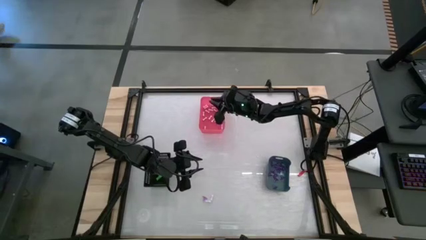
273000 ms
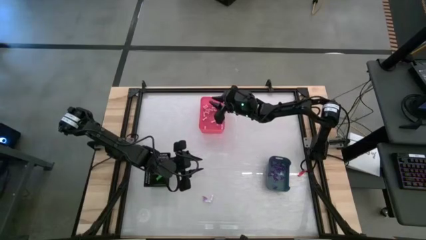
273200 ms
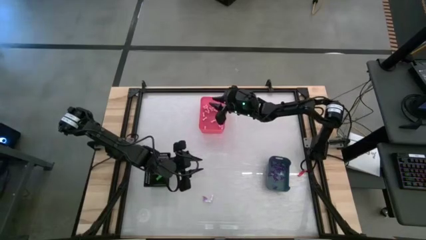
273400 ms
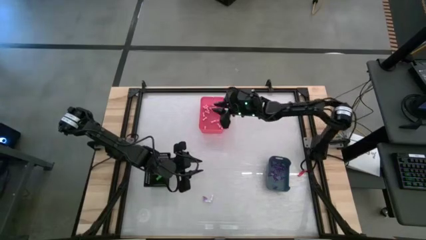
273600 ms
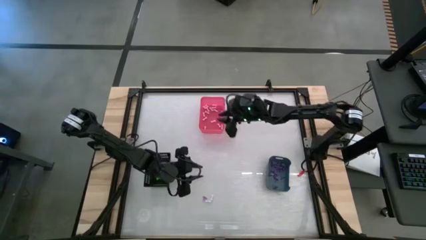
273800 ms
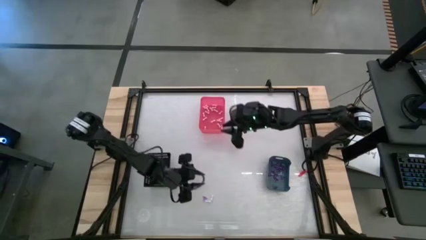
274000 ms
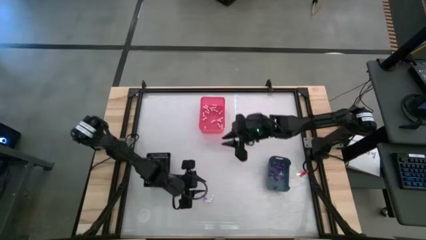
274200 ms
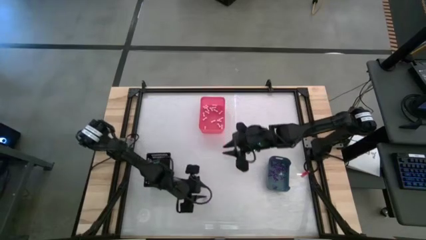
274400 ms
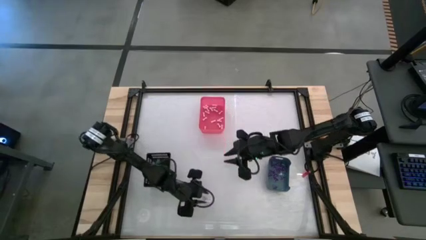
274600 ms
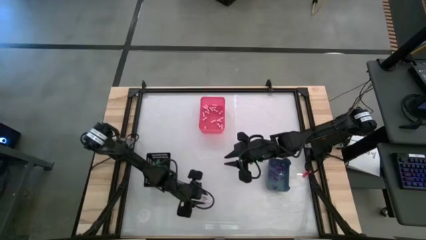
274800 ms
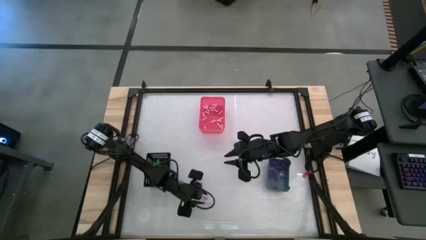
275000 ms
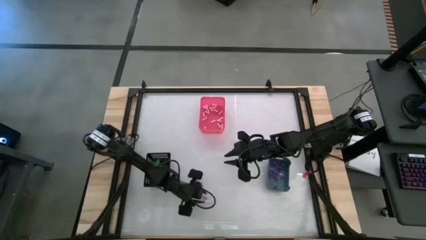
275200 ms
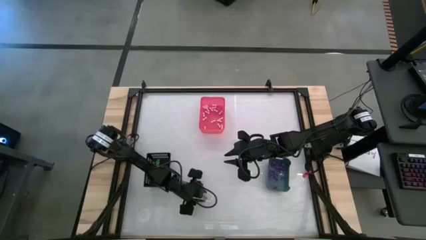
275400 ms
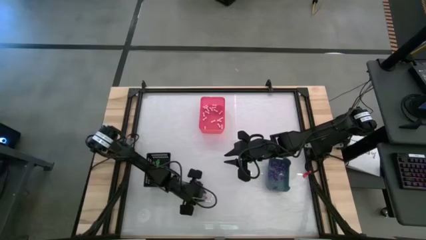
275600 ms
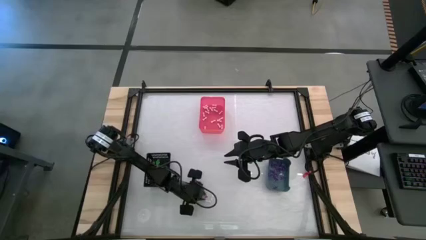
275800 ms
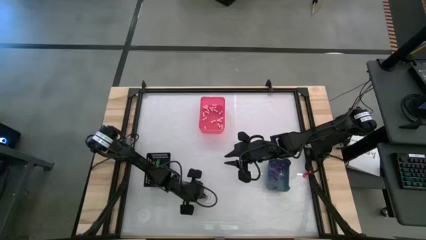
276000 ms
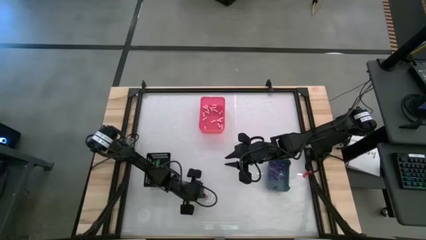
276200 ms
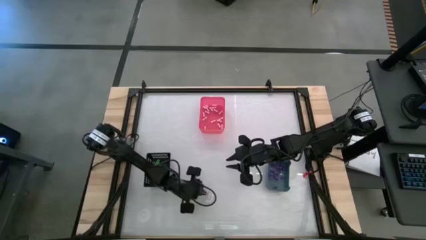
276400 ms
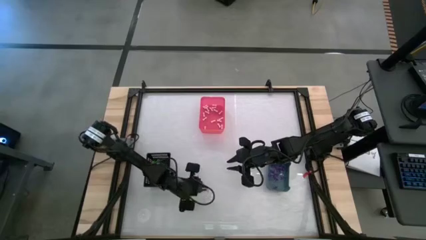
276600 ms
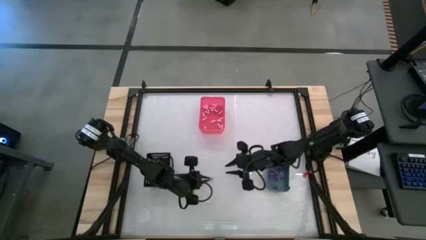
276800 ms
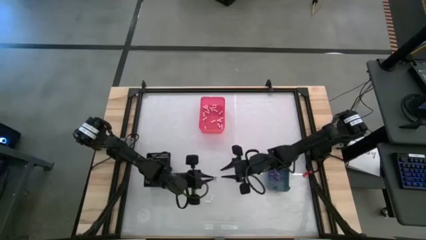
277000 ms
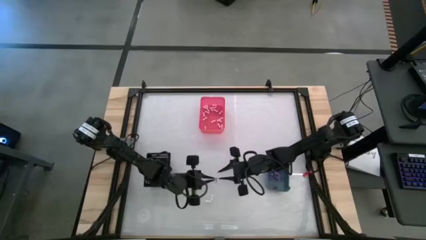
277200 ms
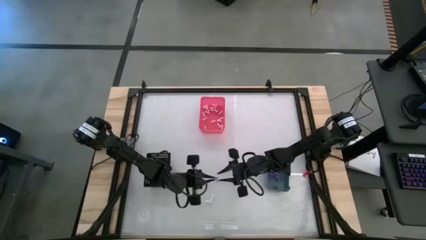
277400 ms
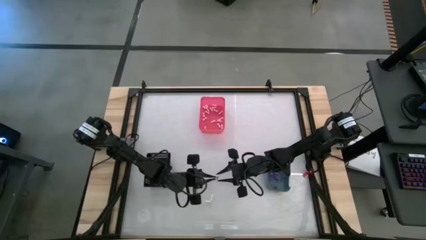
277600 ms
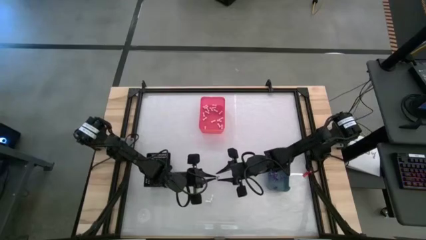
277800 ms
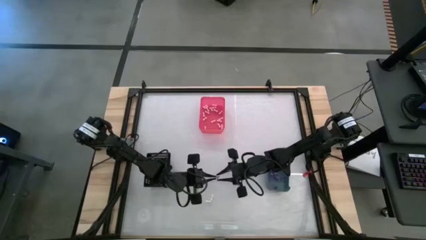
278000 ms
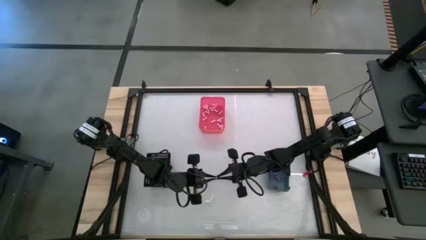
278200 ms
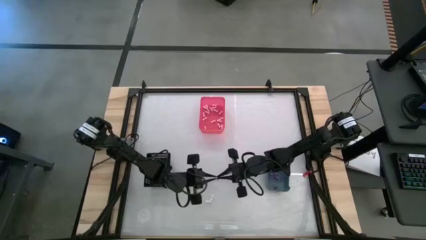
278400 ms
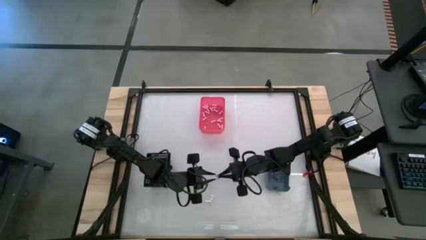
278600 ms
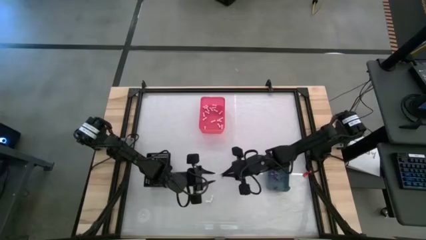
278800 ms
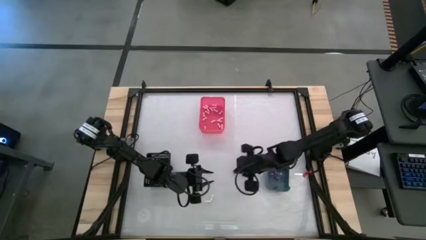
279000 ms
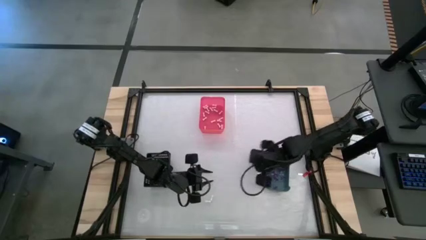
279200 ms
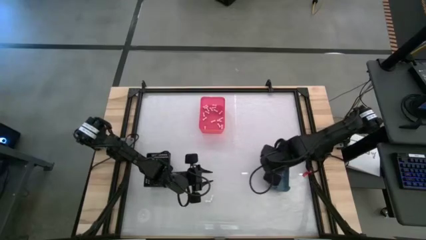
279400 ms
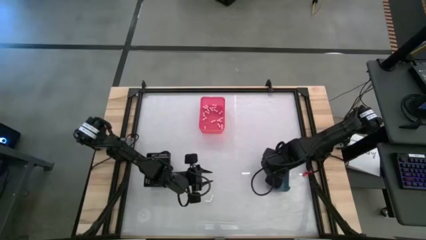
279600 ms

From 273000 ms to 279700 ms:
Task: Sort Halloween decoration
Put the witch hat toy into the blue bin

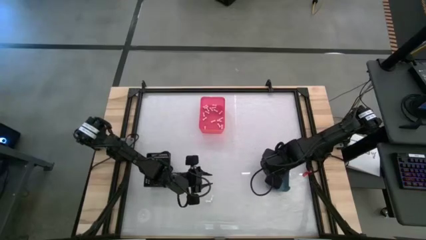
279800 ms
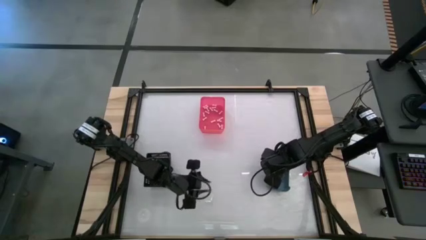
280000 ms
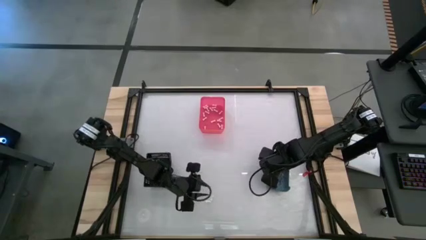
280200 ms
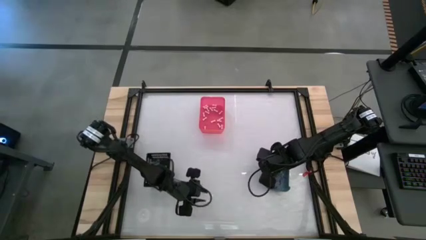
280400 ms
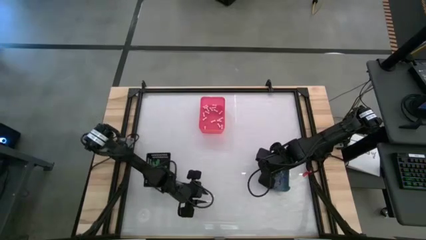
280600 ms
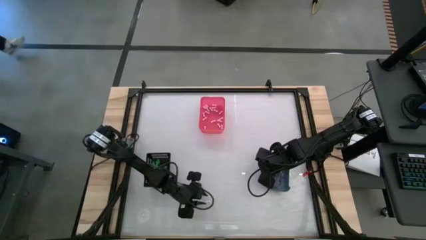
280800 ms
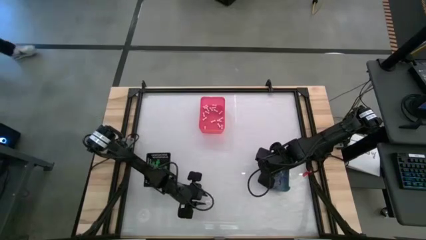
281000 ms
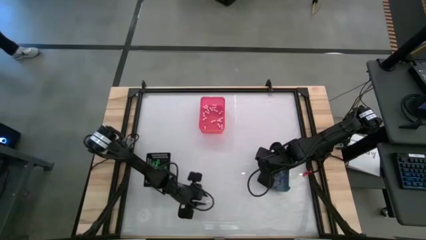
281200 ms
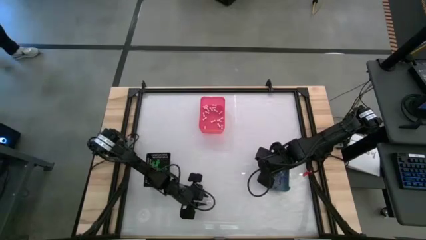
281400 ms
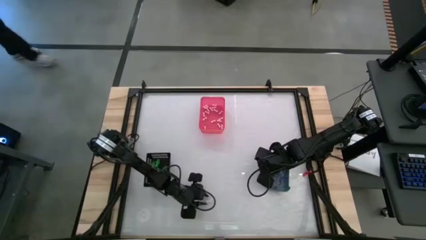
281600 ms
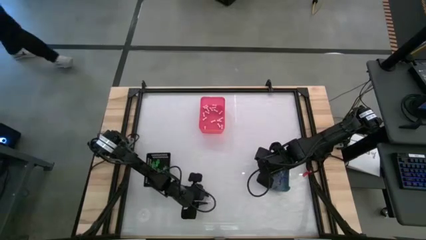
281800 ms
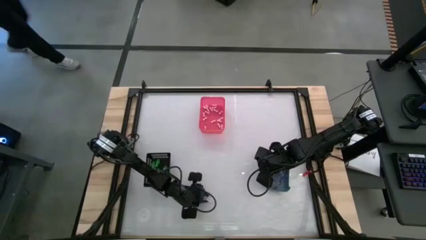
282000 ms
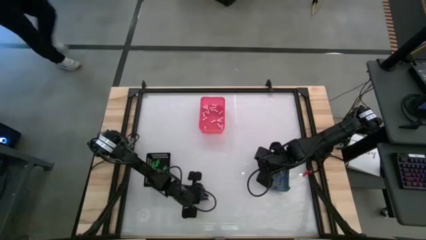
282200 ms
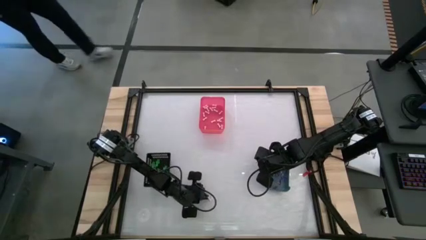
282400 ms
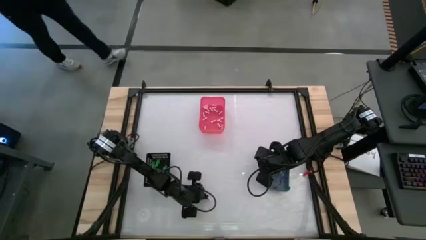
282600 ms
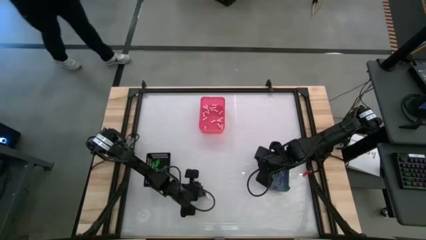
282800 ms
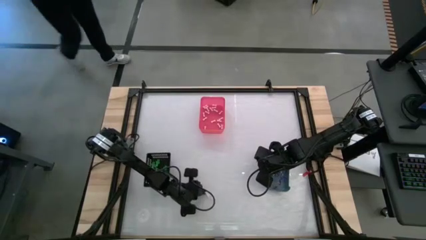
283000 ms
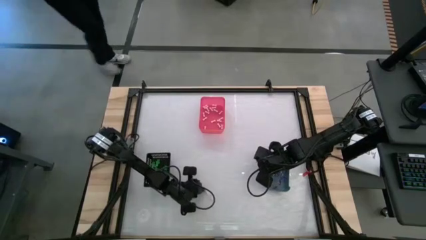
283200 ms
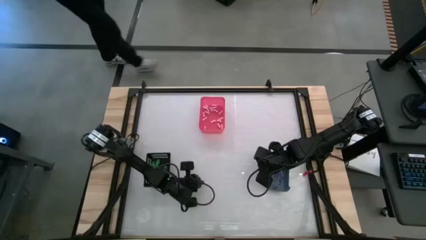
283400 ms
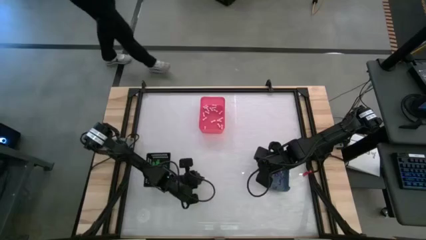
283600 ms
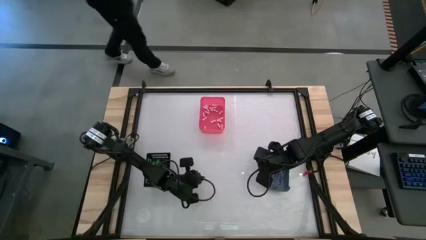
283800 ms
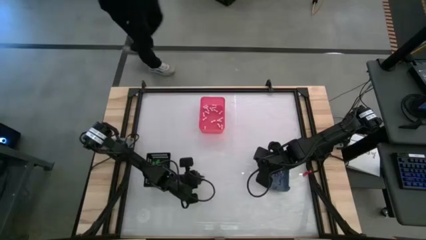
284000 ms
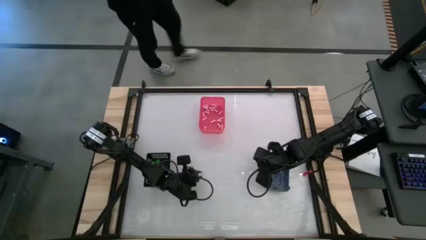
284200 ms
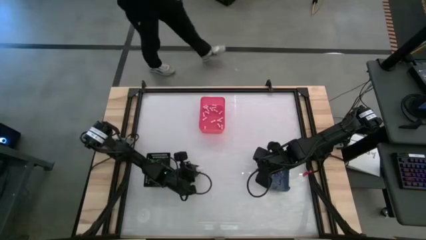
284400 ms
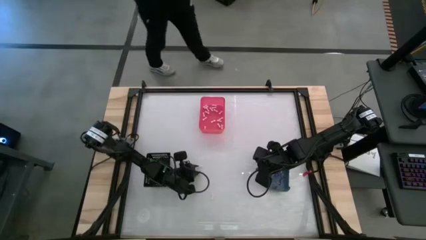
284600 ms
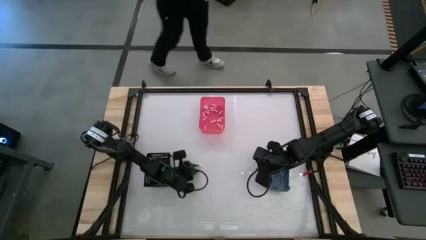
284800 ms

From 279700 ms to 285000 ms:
Put the bone toy into the red bin

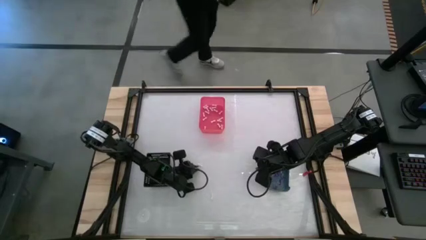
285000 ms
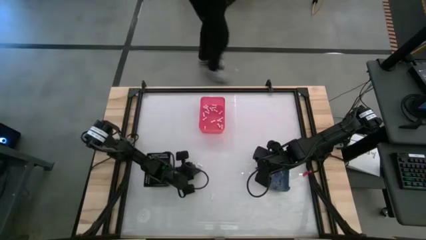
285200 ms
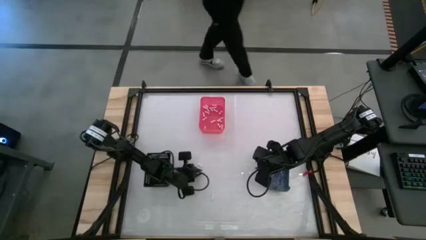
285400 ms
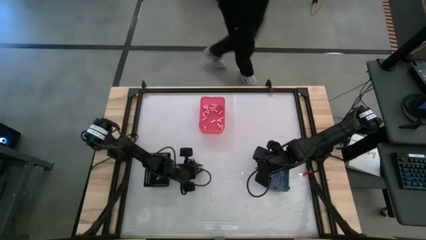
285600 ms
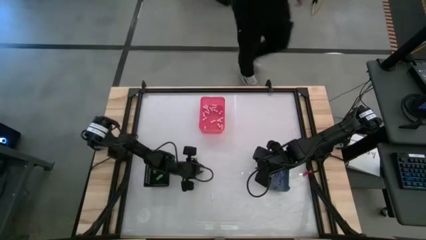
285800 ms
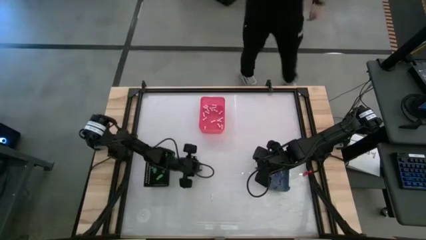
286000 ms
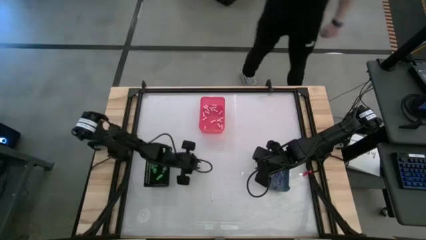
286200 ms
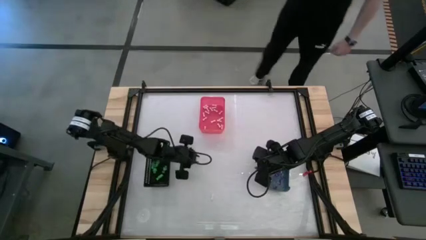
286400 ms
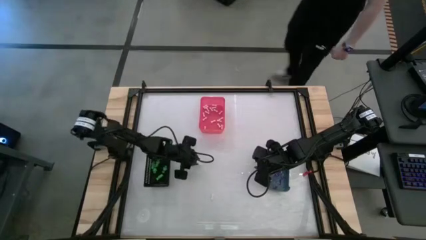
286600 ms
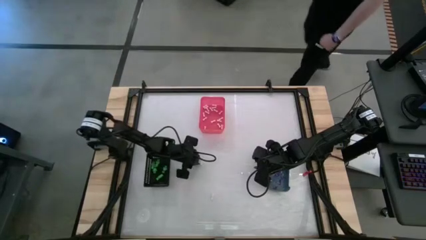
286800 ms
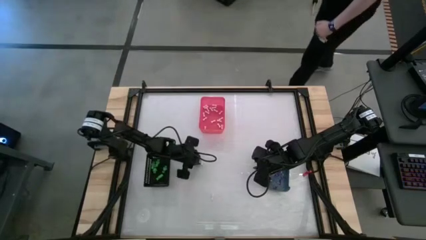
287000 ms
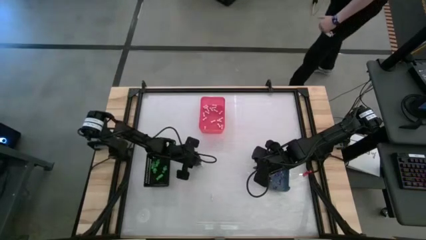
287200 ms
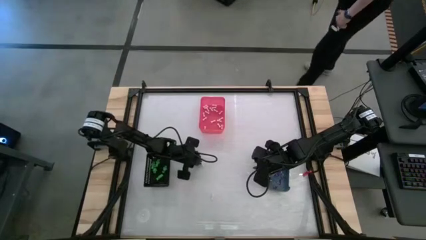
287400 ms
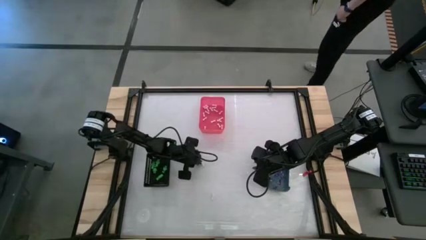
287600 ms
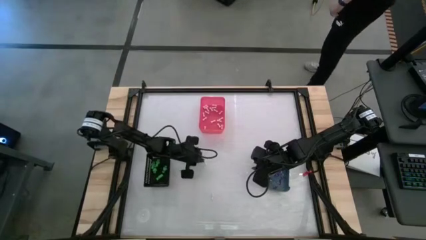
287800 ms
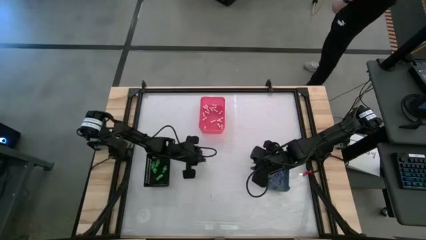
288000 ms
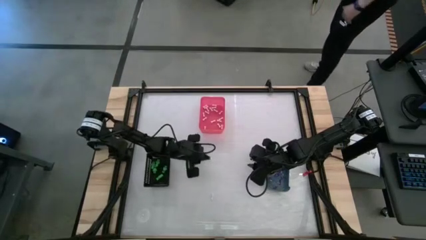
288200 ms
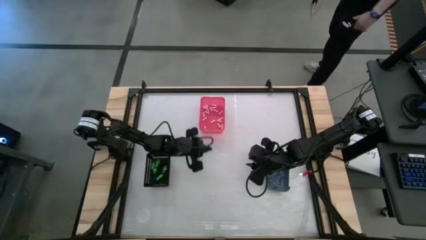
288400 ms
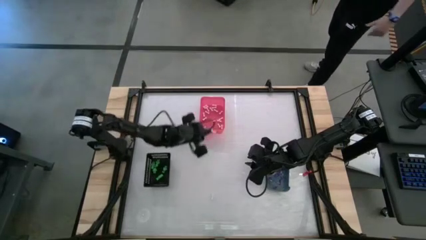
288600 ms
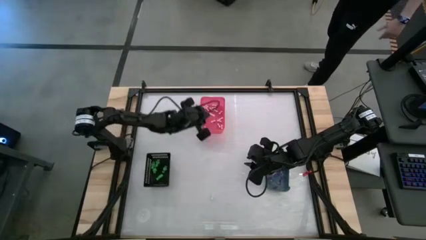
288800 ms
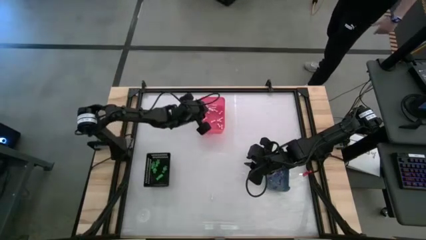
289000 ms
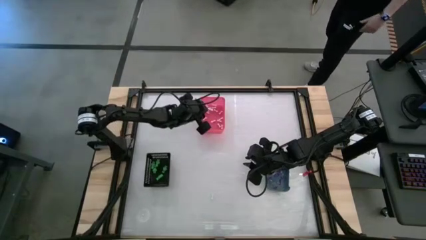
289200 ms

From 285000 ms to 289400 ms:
Put the bone toy into the red bin
